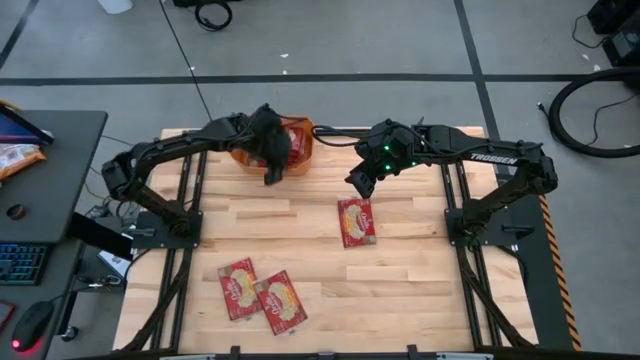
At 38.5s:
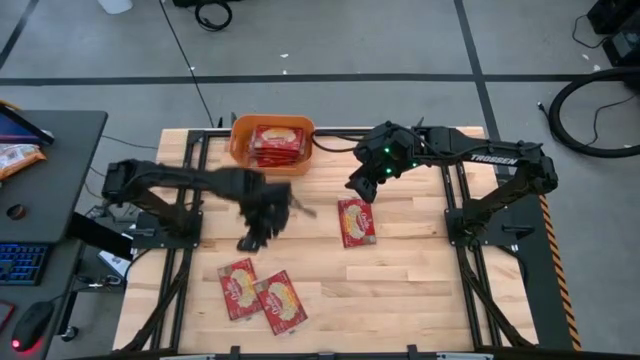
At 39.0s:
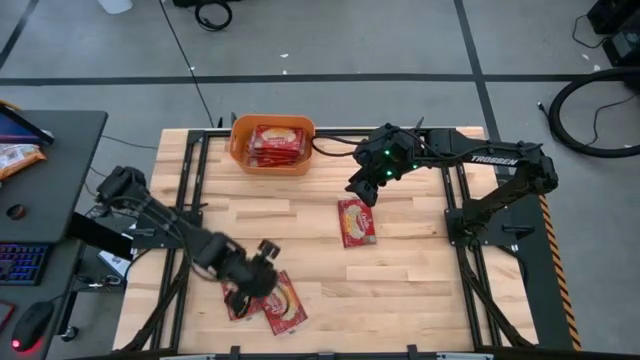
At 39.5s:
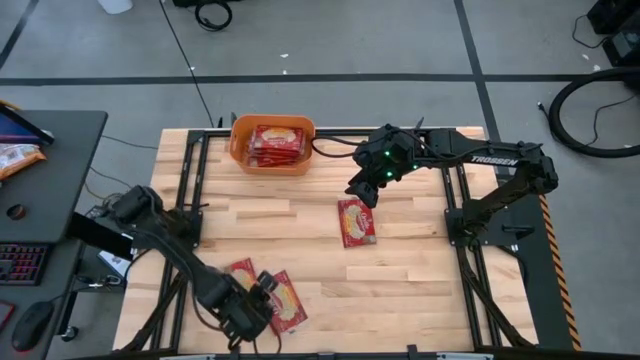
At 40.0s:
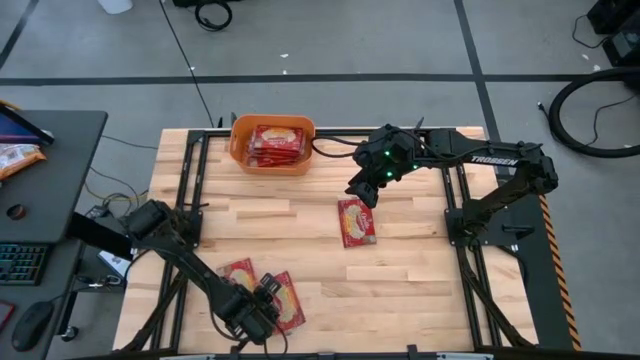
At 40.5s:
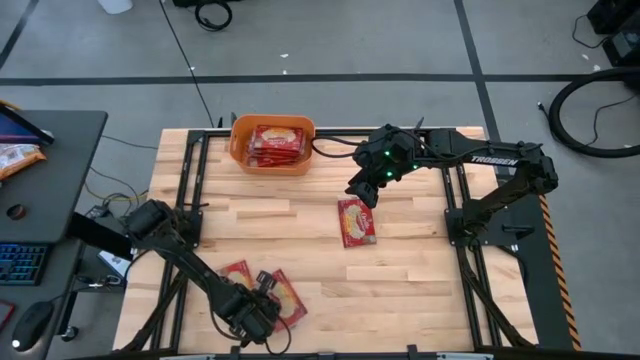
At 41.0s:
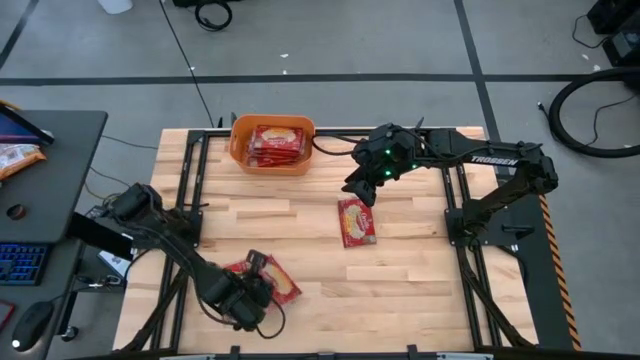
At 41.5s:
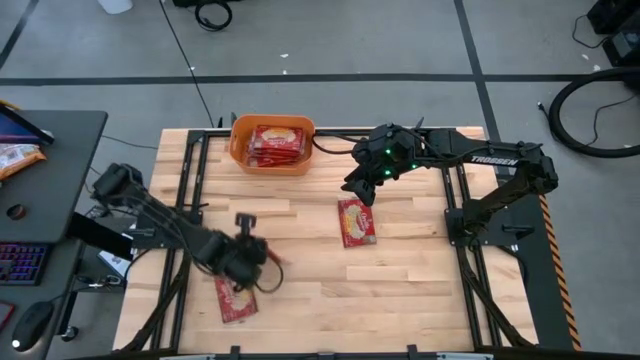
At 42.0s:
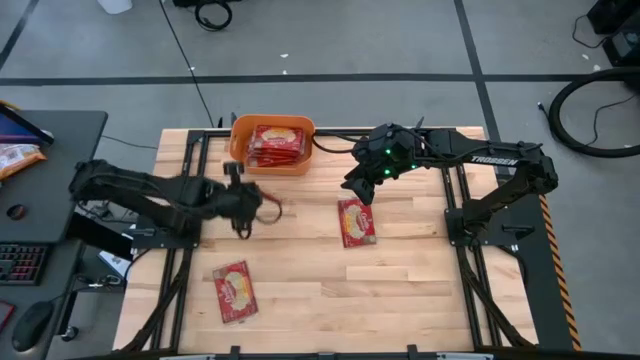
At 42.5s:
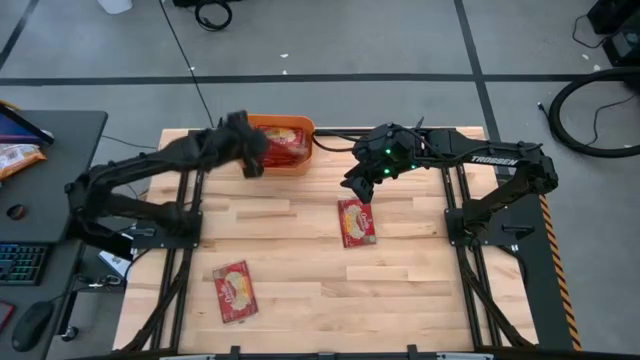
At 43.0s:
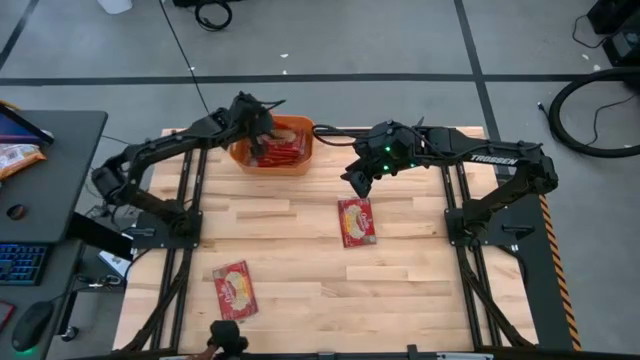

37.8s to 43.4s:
Task: Sort popcorn bags into baskets
Put the popcorn bag into the orange bin

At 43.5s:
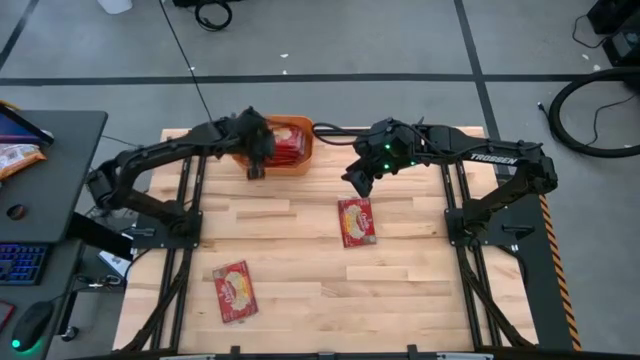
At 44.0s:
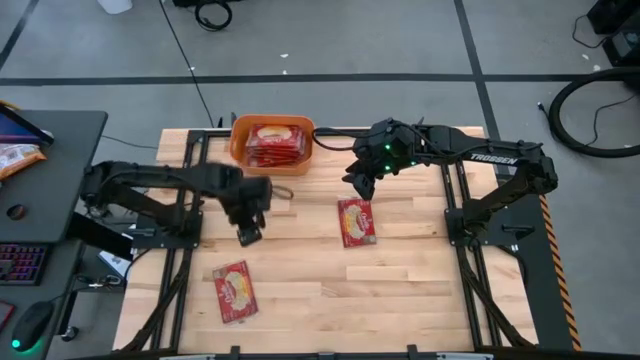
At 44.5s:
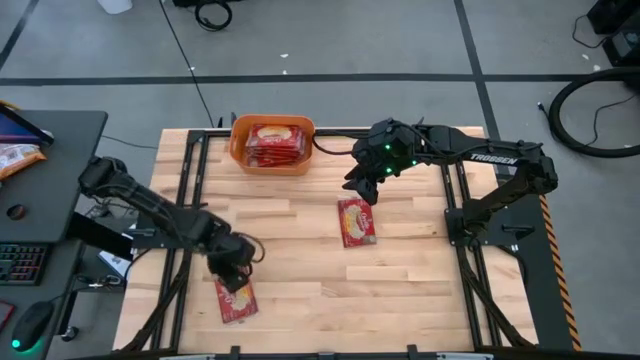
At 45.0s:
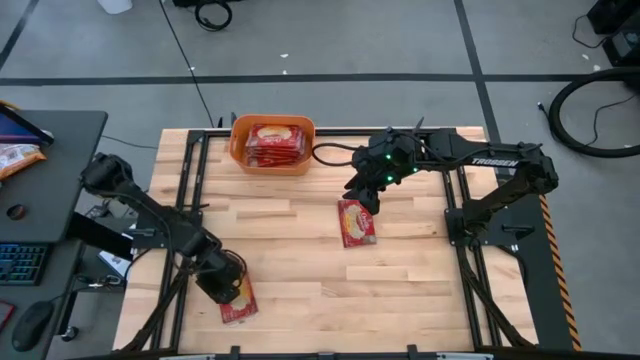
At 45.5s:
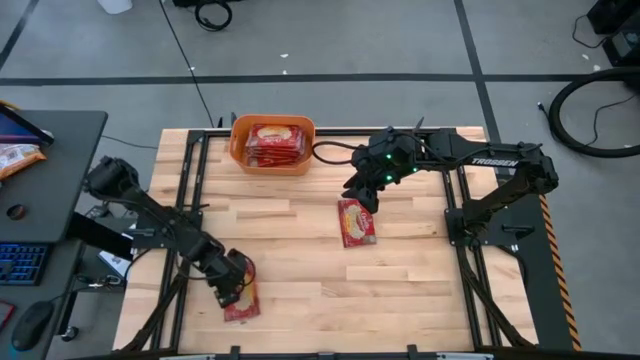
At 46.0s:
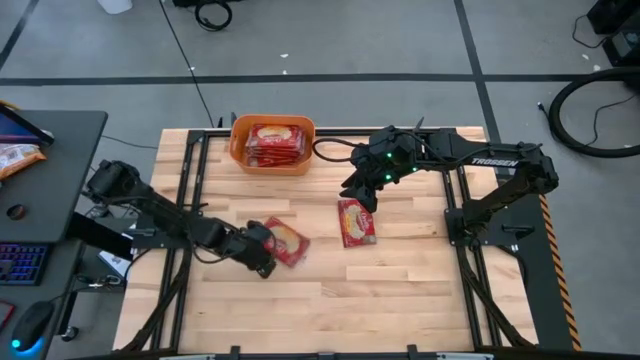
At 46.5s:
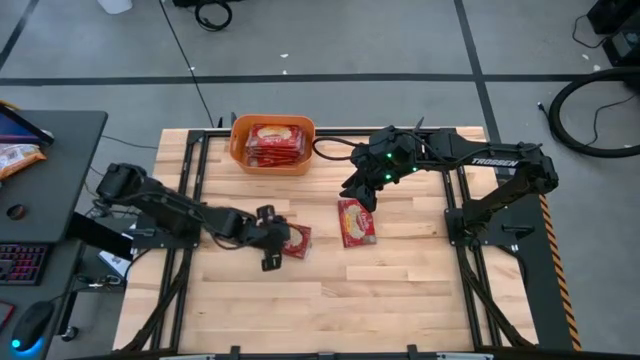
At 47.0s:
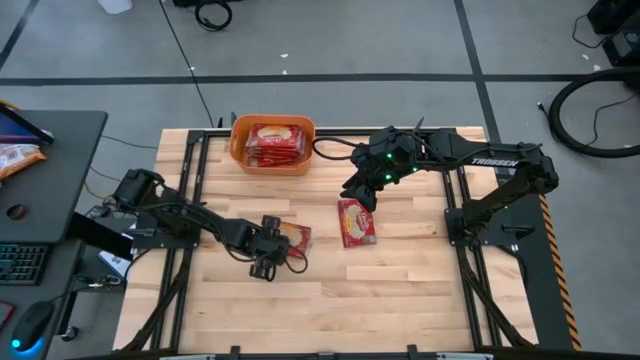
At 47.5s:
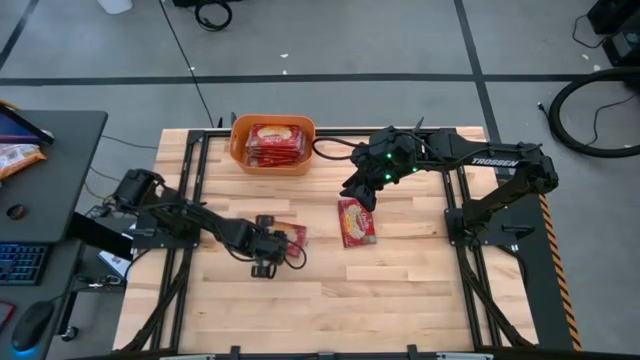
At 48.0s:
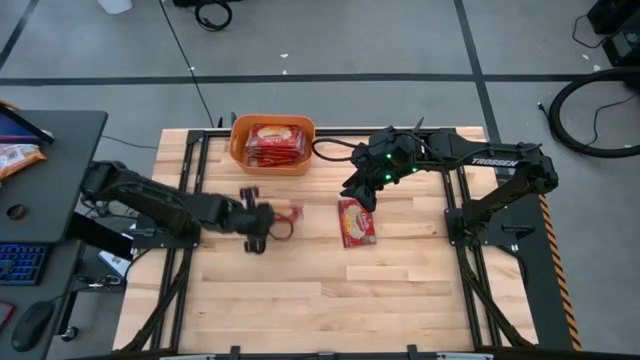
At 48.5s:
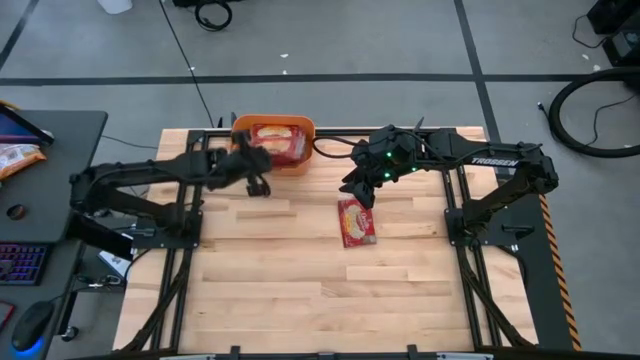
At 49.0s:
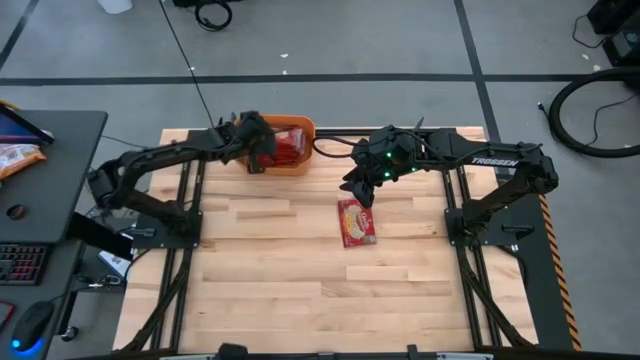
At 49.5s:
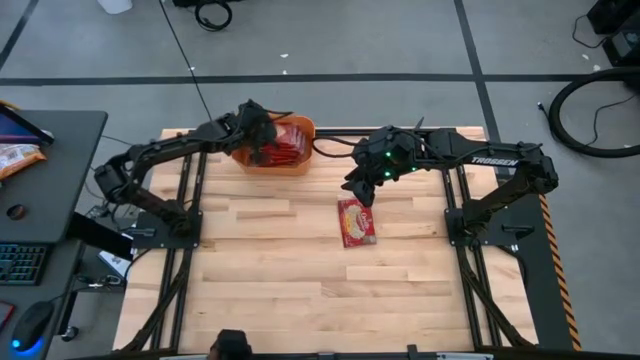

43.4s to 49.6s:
Put the popcorn bag into the orange bin

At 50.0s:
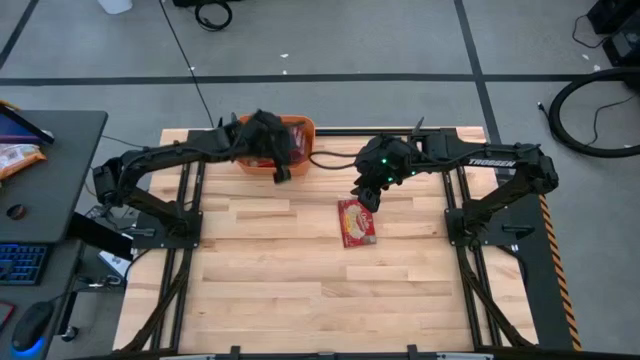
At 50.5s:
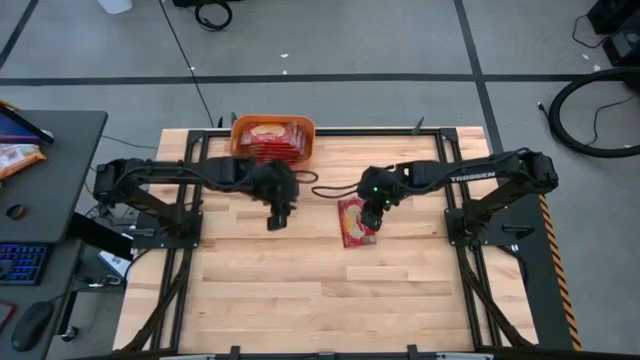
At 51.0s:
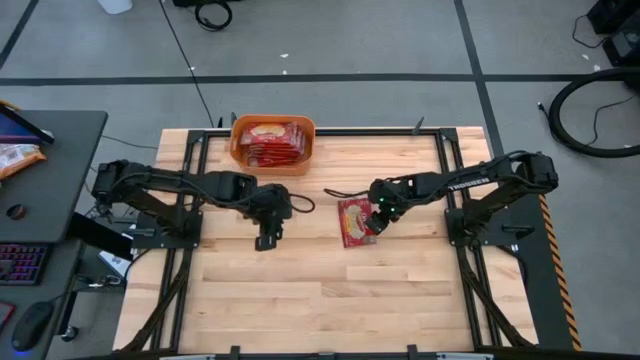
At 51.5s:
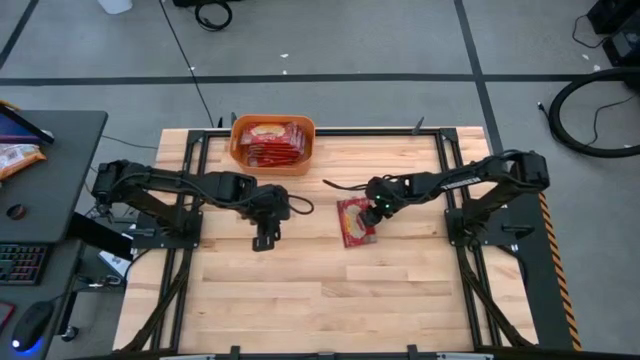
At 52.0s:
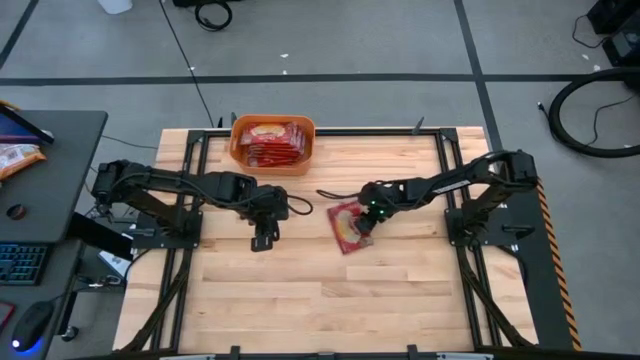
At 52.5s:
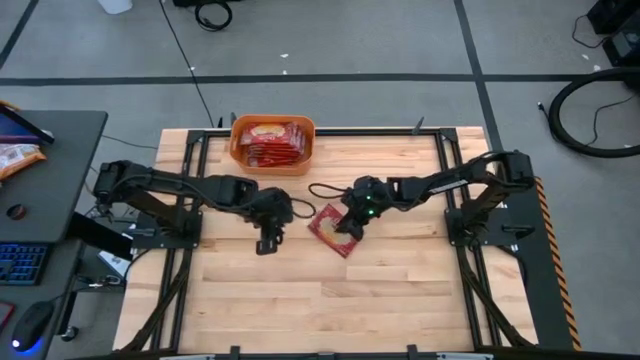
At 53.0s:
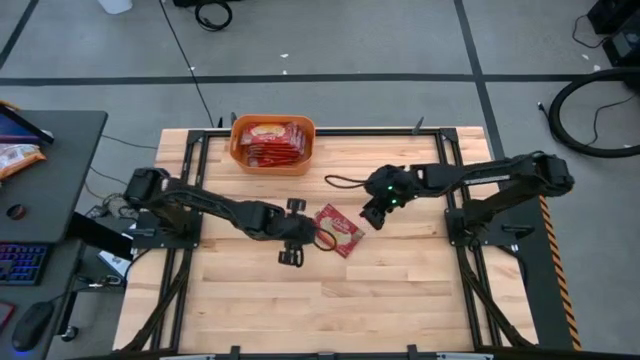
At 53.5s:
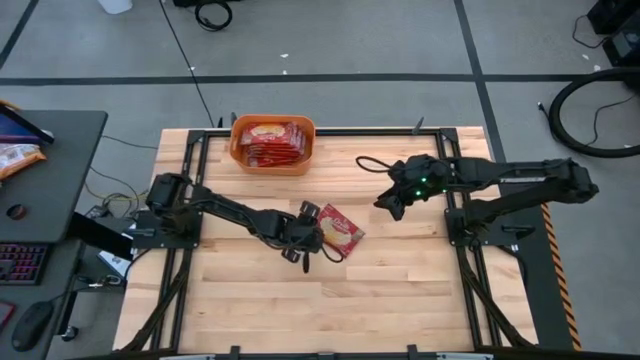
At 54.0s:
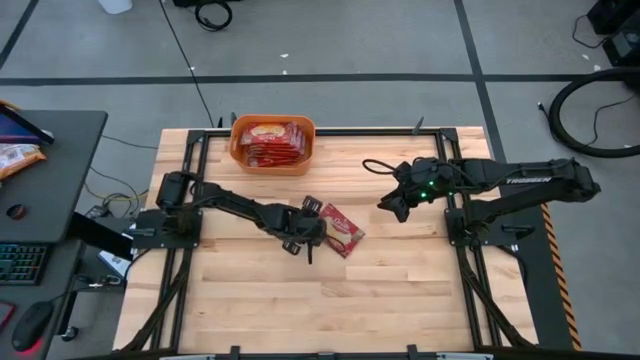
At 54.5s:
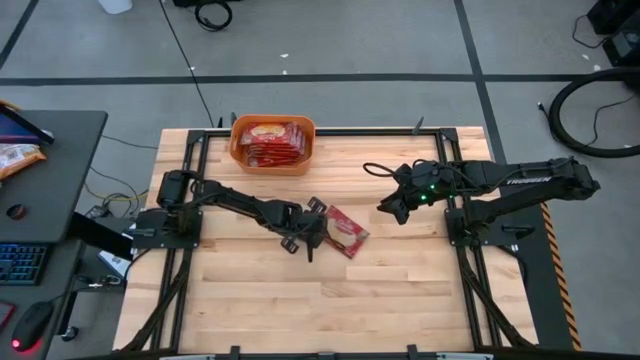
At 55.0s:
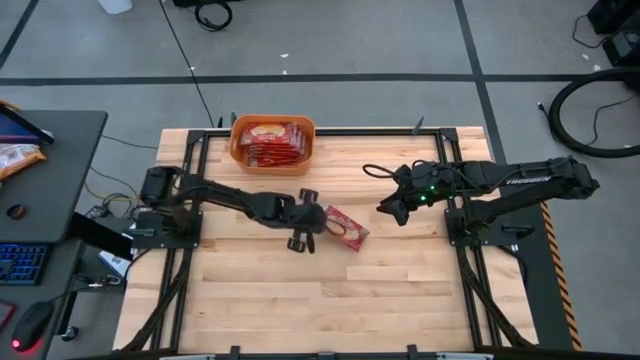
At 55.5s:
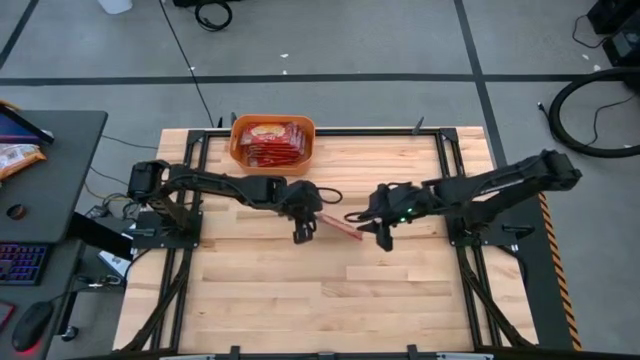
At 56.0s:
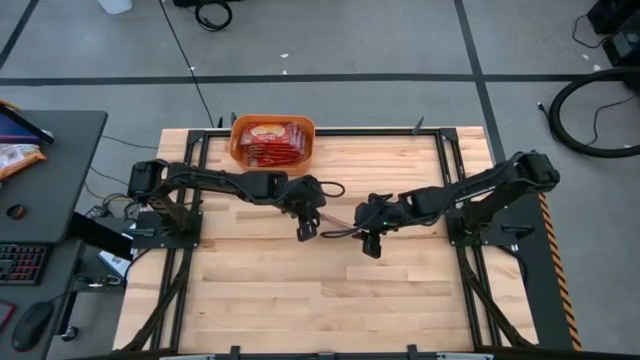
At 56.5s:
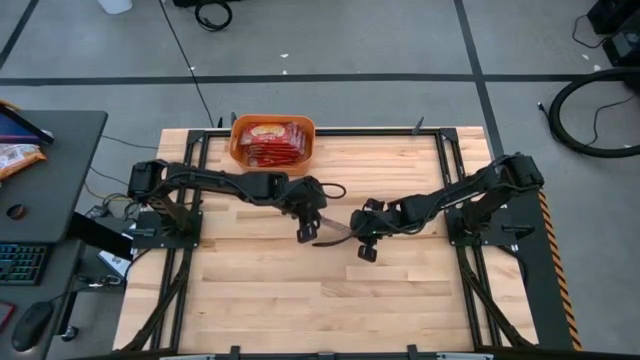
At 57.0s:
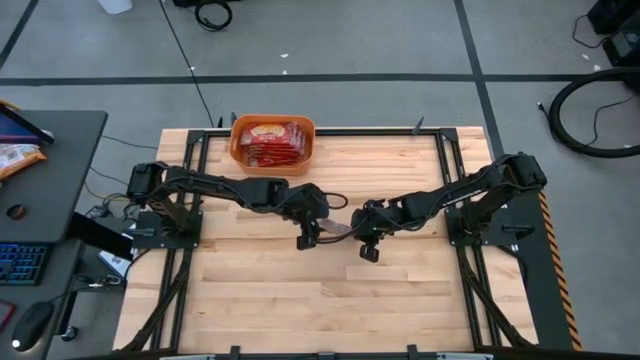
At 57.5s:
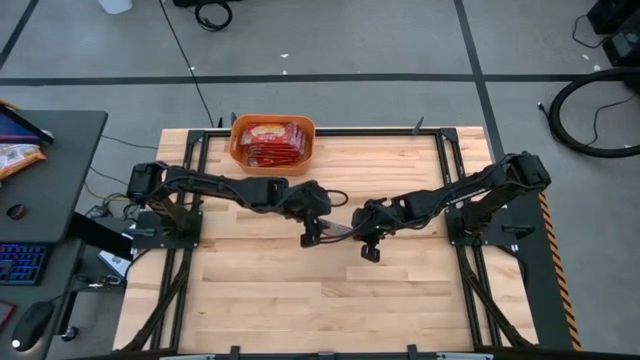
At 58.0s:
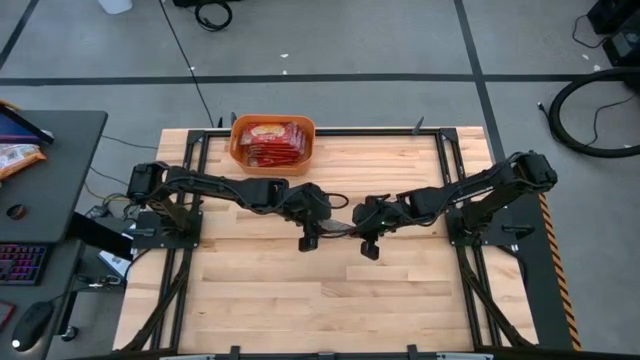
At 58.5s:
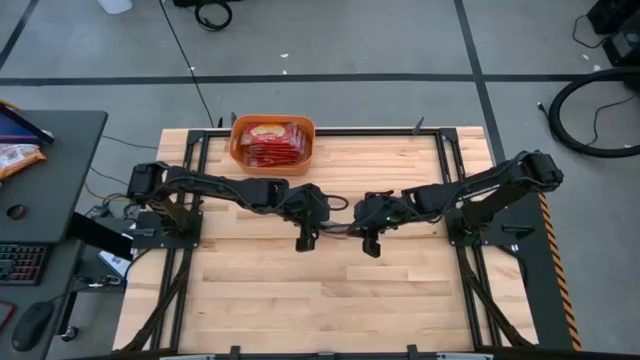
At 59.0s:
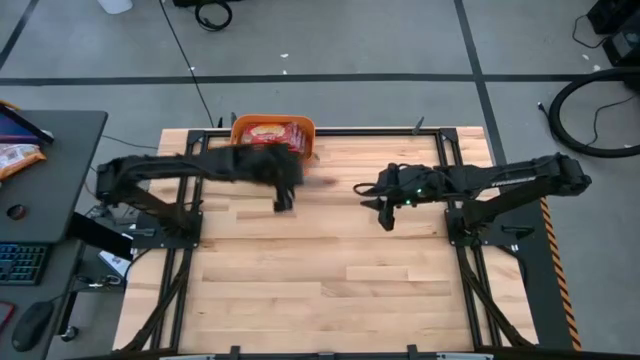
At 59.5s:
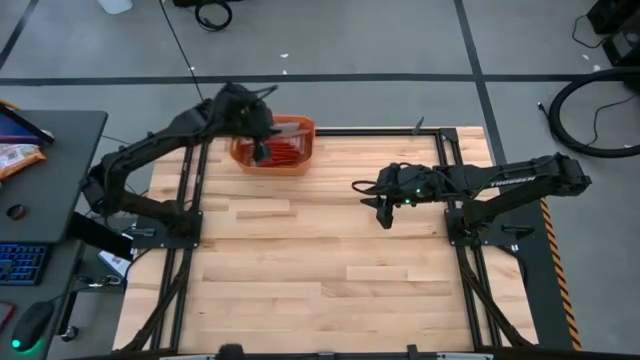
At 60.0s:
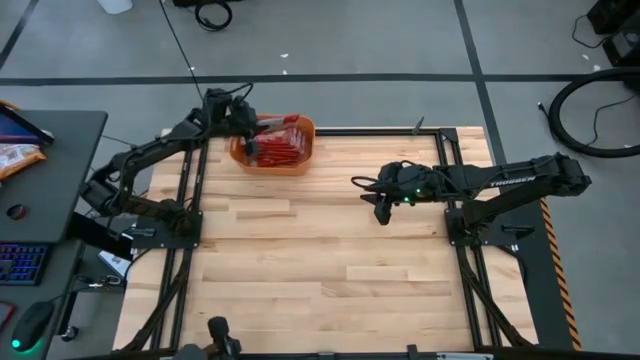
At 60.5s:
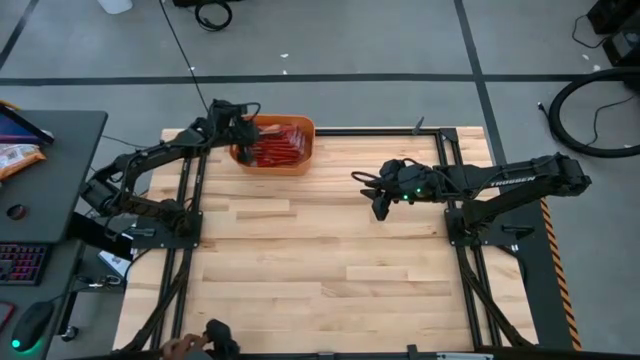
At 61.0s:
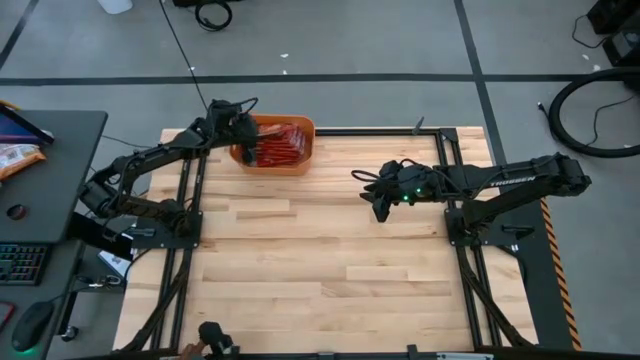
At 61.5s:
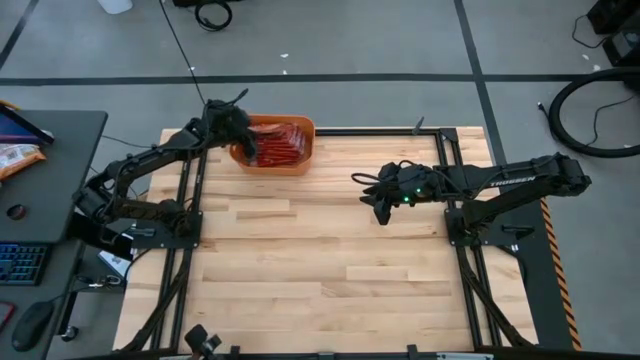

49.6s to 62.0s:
Put the popcorn bag into the orange bin
